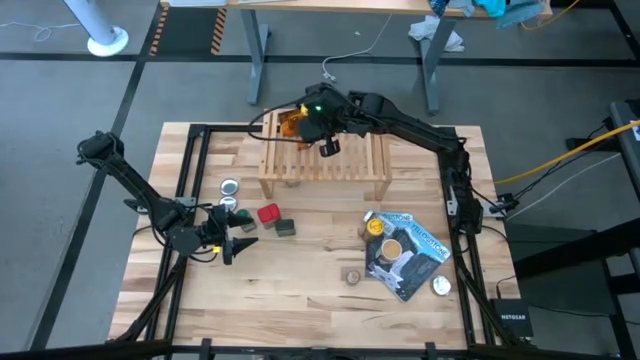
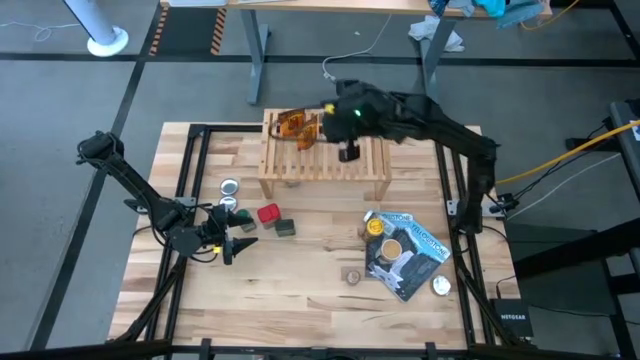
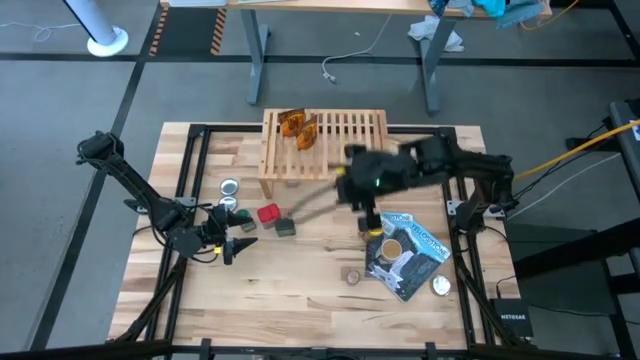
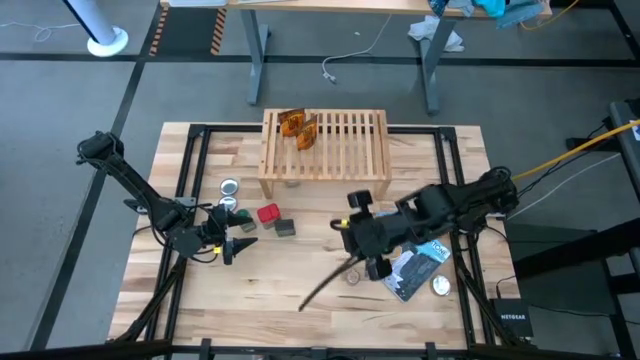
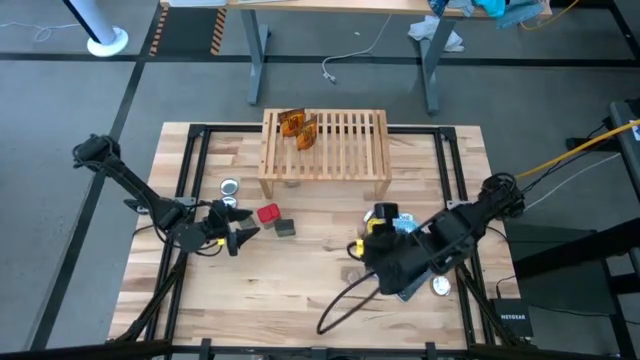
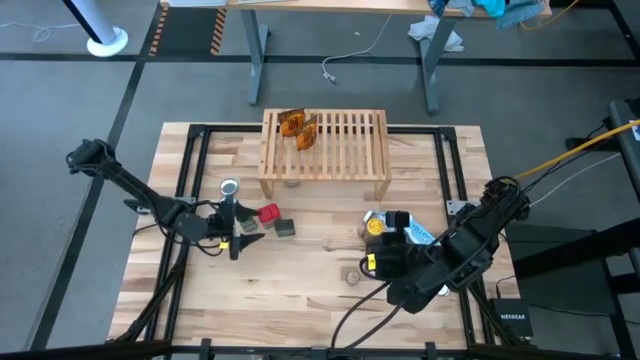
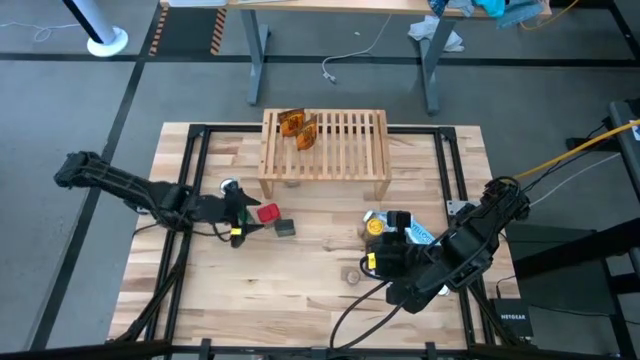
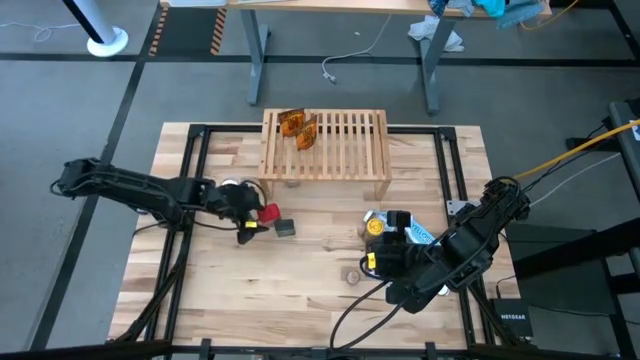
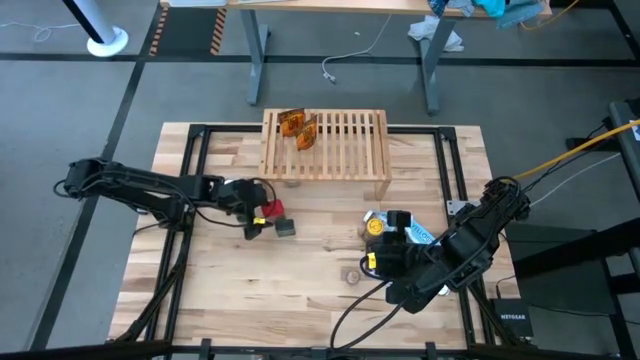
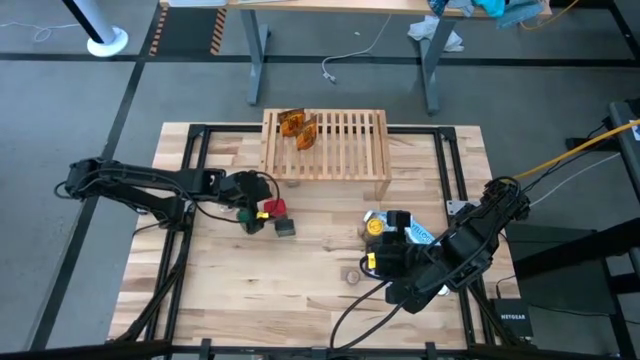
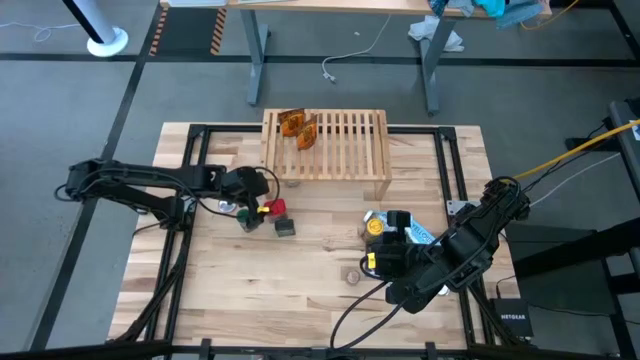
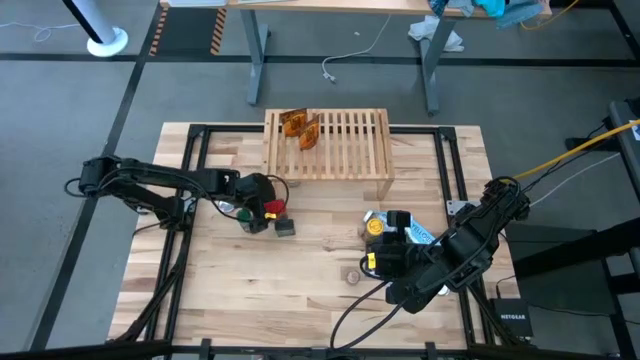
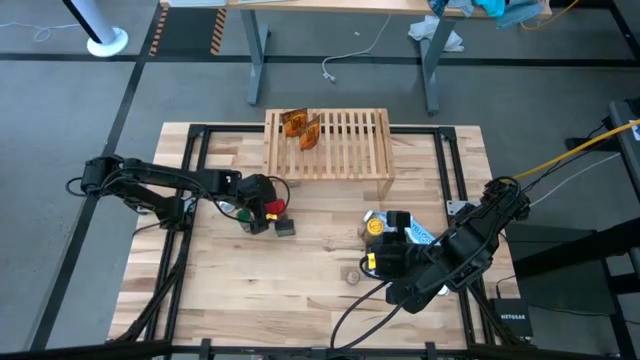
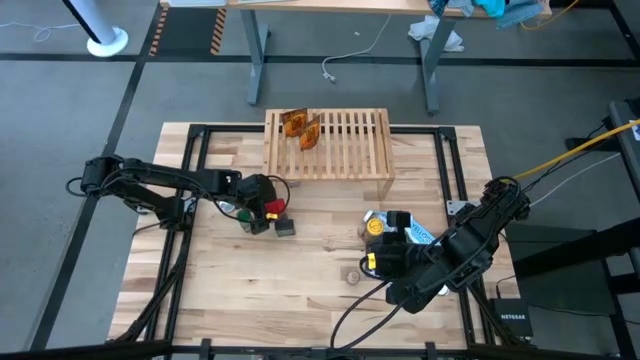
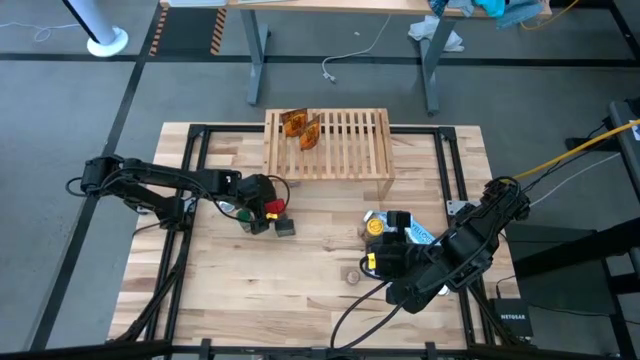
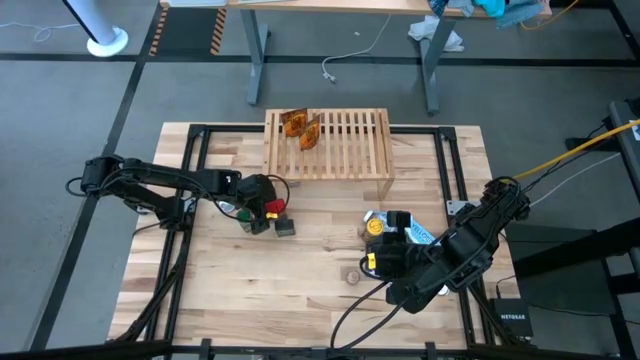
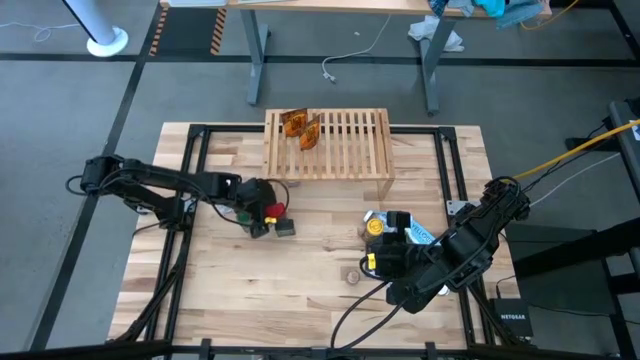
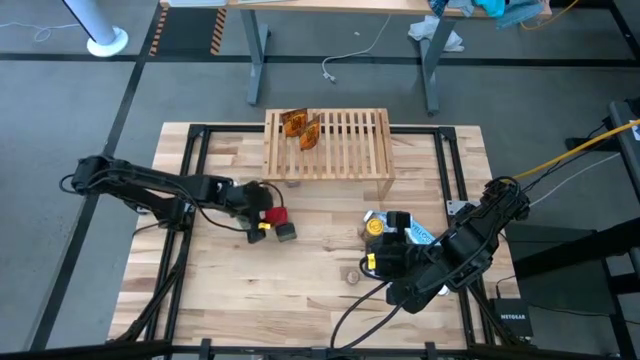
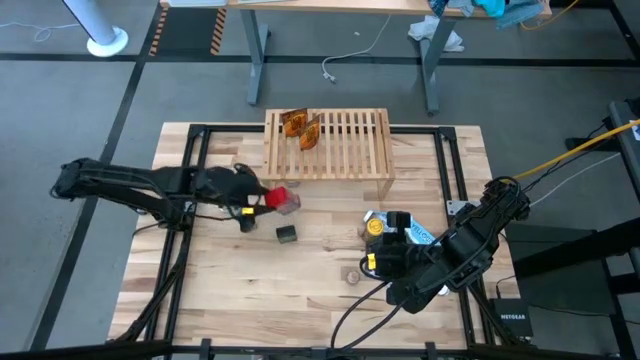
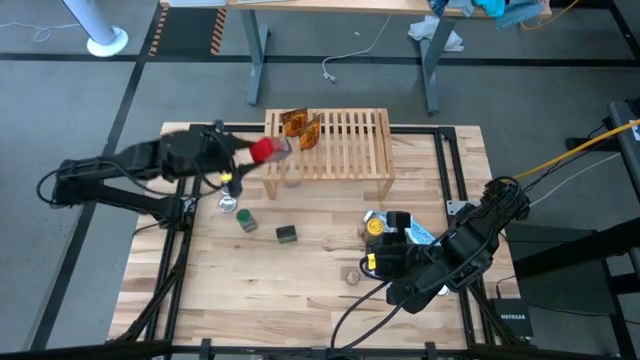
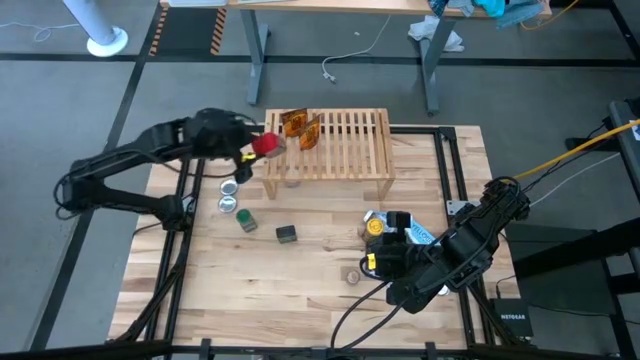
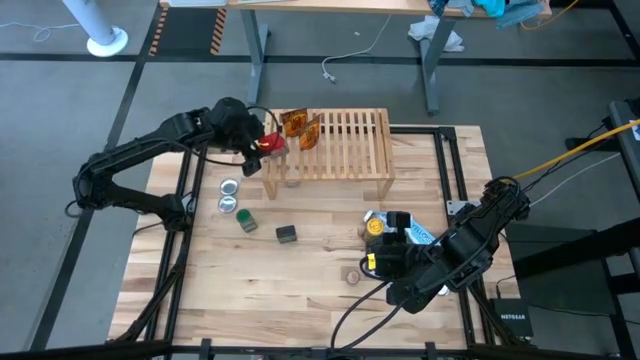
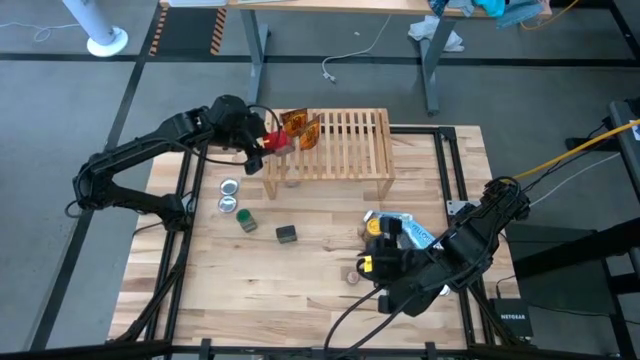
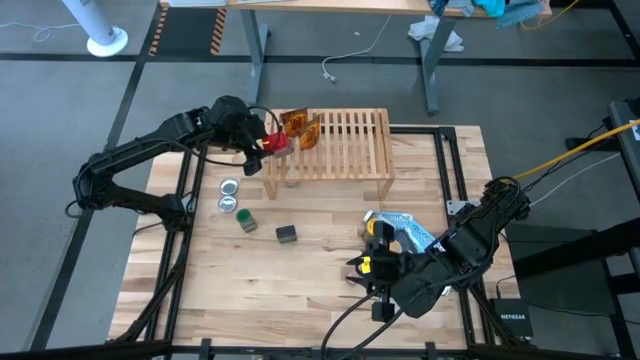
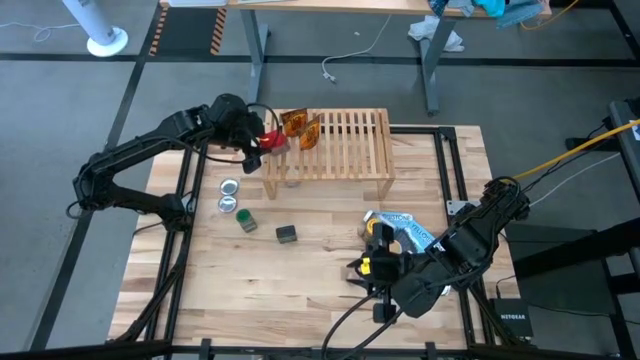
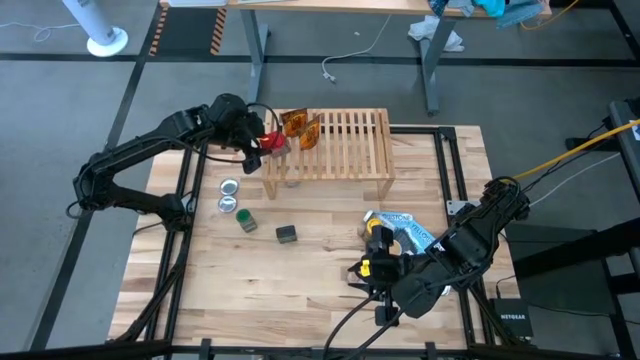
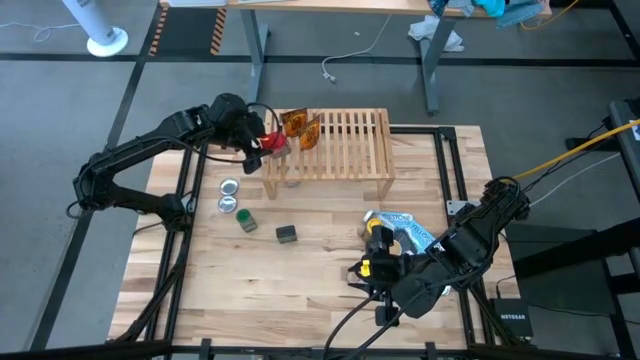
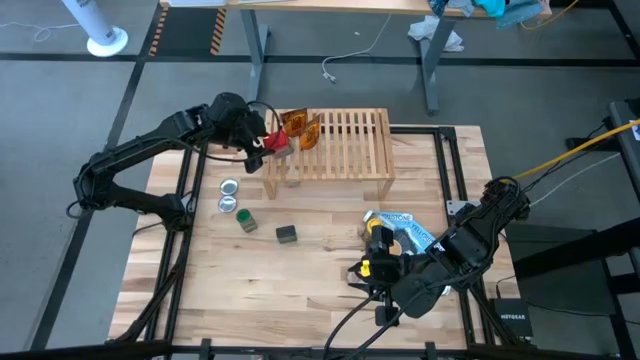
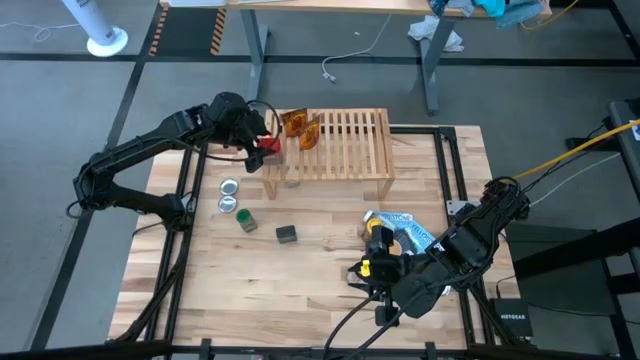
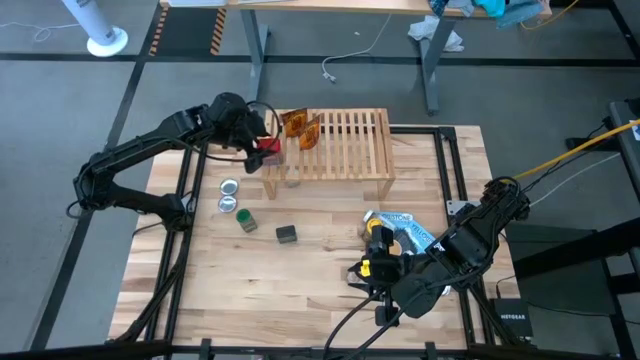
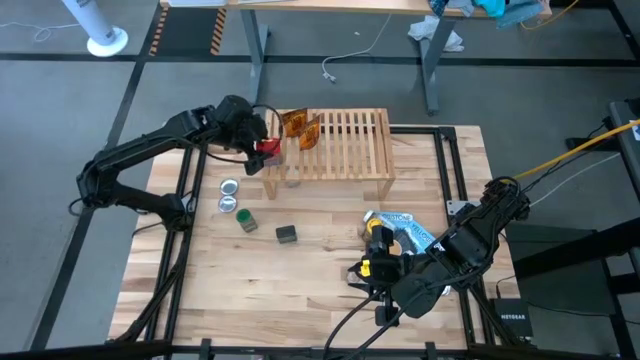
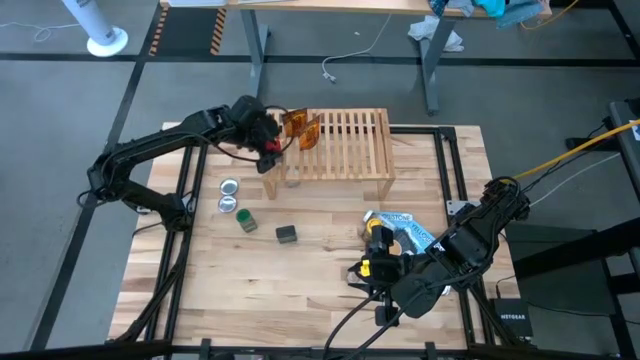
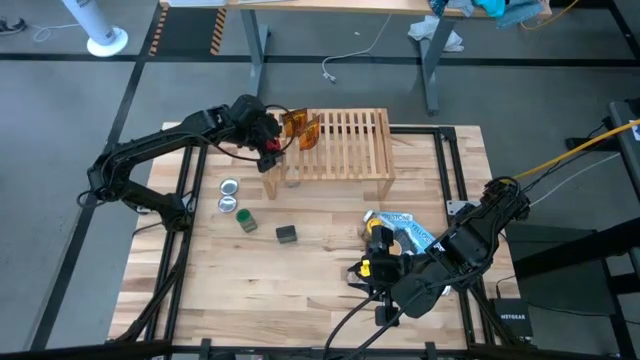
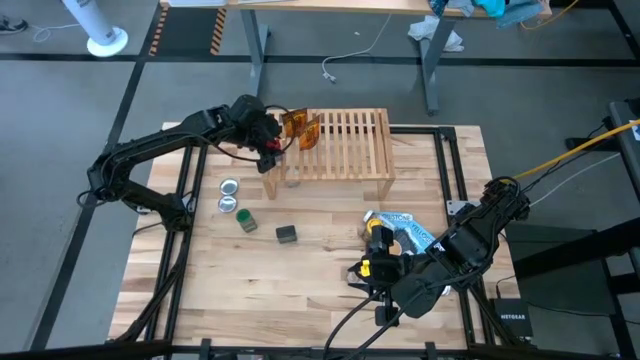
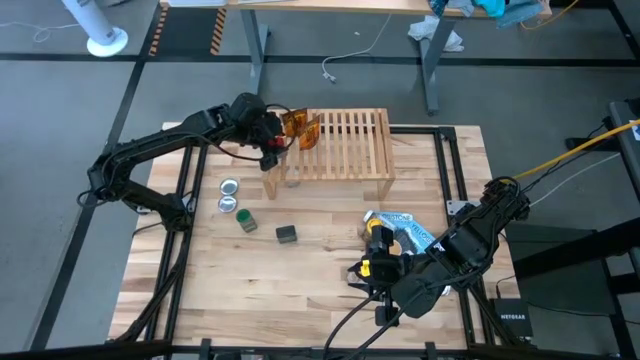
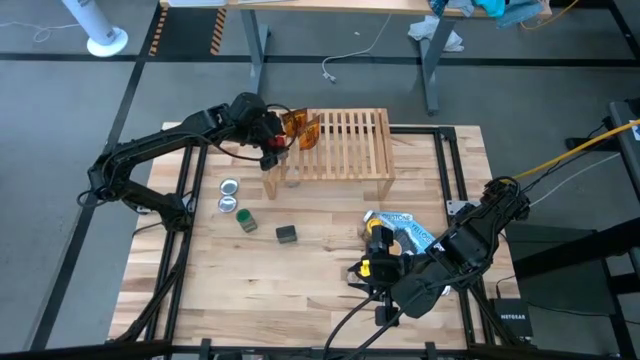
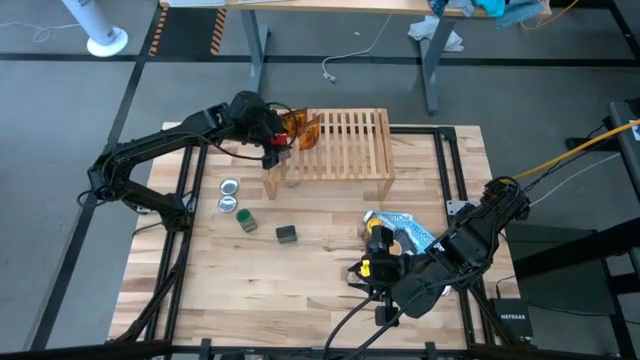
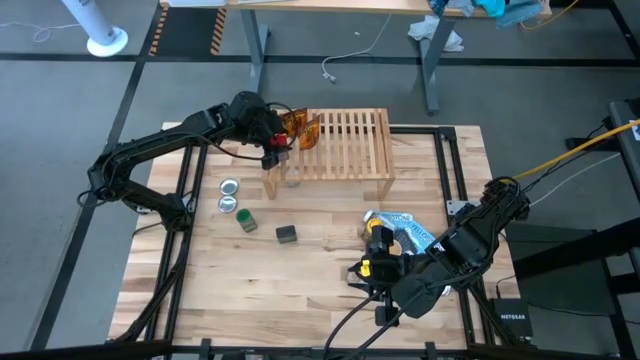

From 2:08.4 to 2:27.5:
Task: Shelf spices
Put the red seasoning can on the shelf

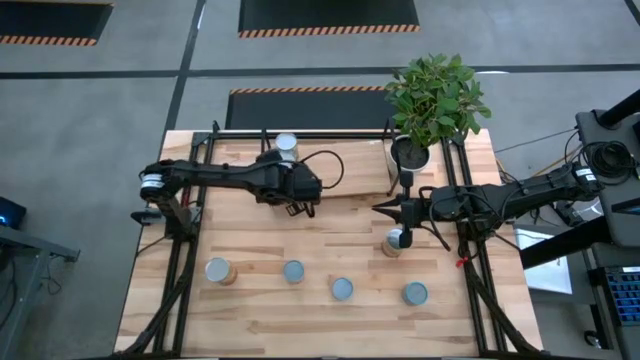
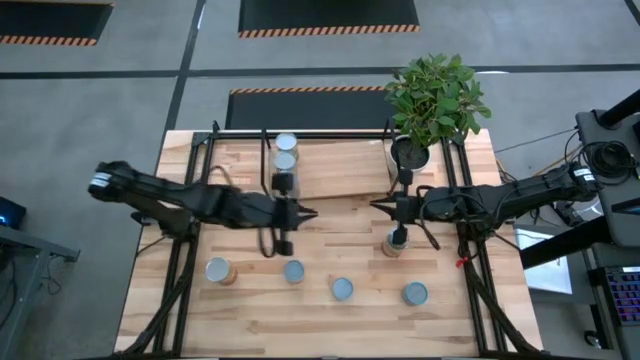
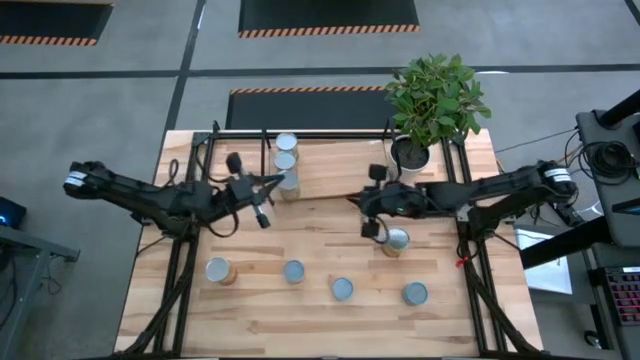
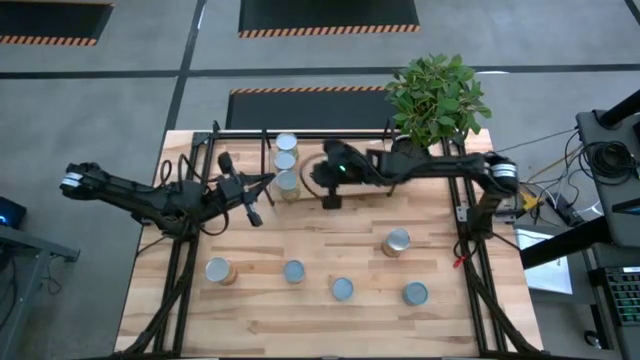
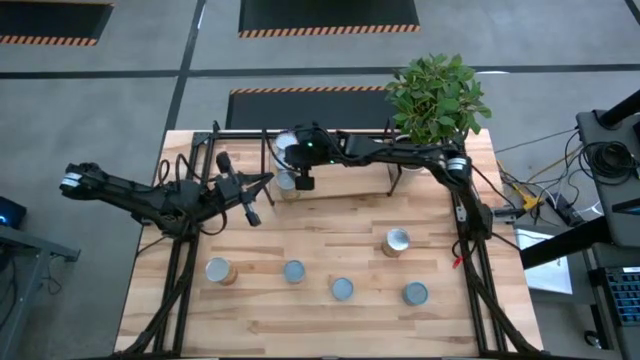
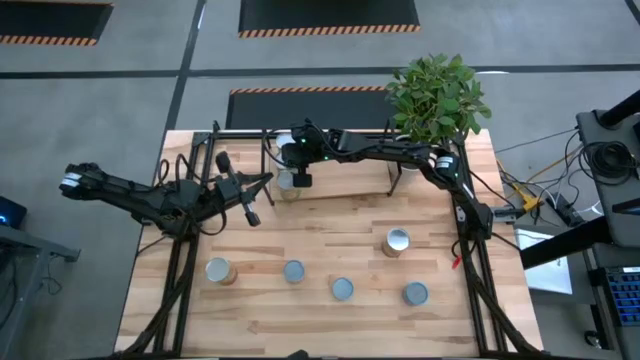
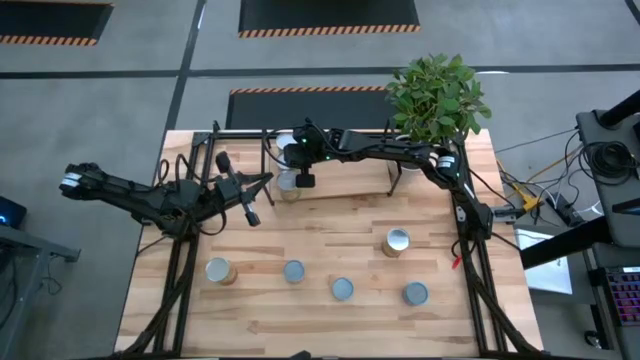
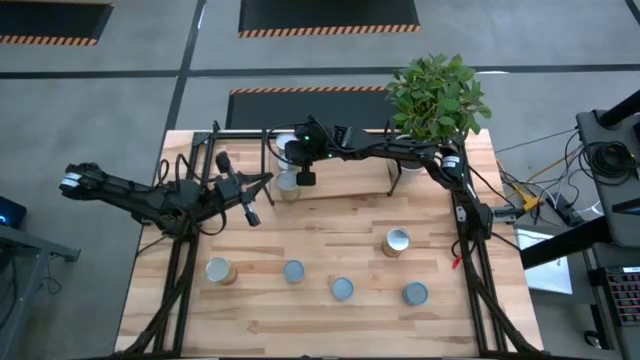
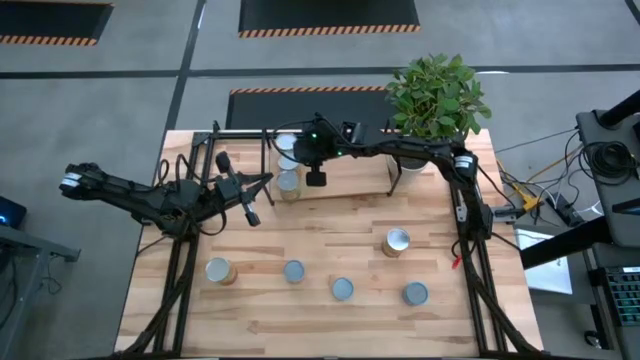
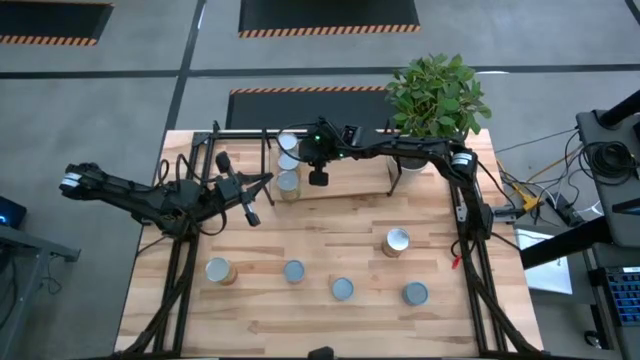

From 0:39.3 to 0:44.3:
Task: Pick and place cans onto a shelf
Adjust the canned green beans on the shelf
